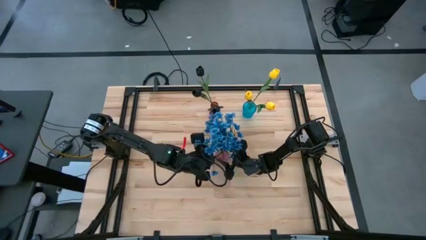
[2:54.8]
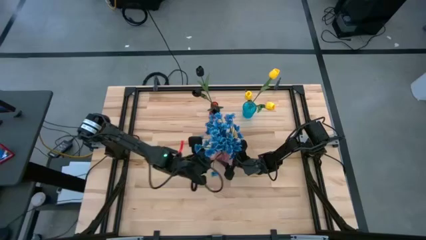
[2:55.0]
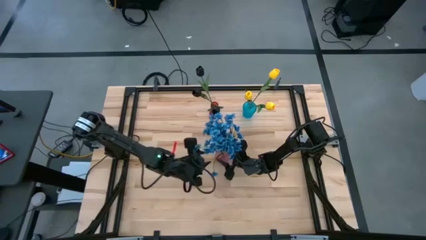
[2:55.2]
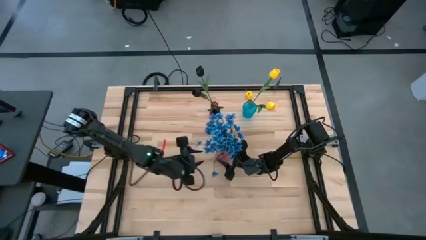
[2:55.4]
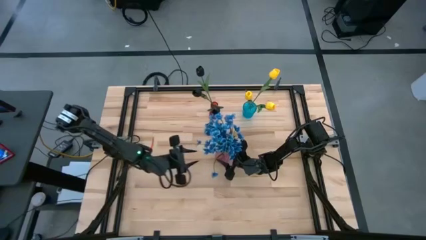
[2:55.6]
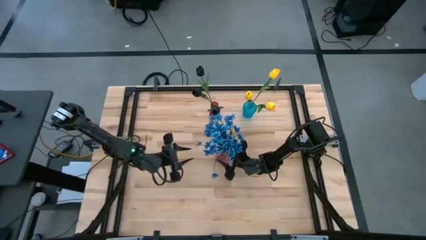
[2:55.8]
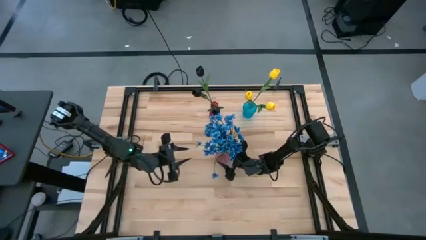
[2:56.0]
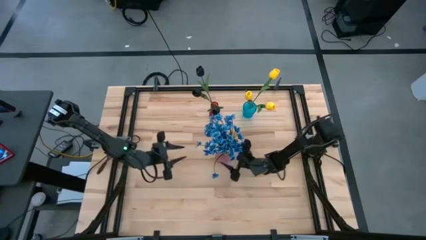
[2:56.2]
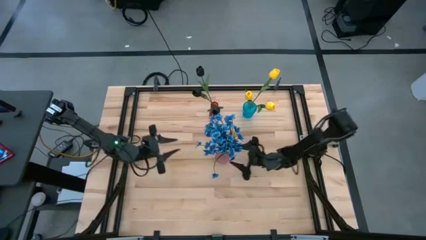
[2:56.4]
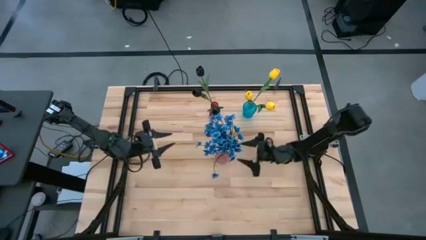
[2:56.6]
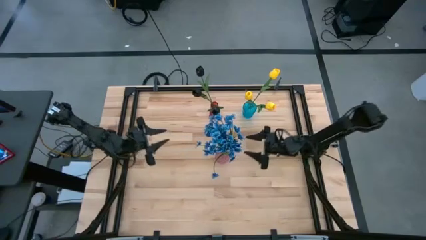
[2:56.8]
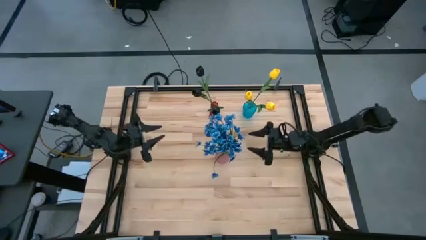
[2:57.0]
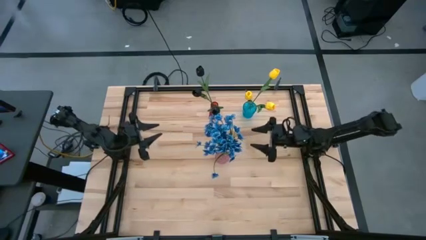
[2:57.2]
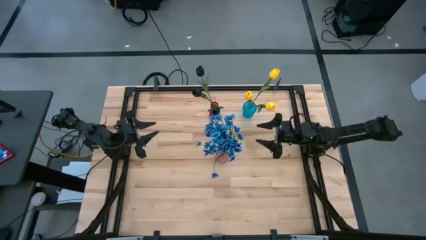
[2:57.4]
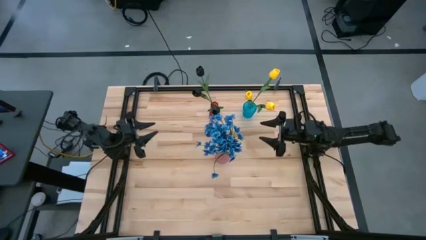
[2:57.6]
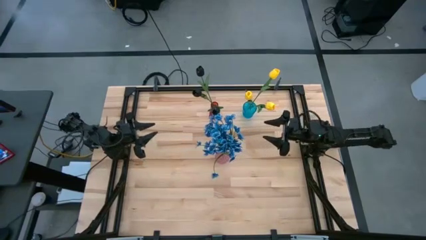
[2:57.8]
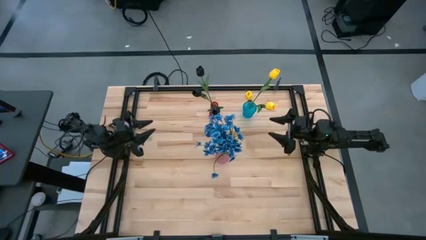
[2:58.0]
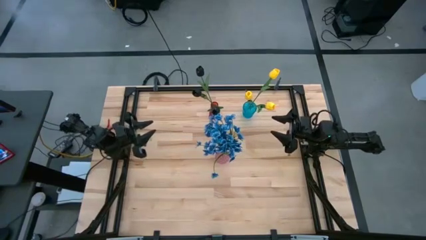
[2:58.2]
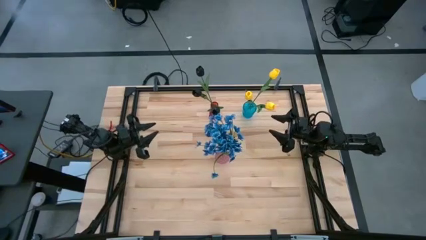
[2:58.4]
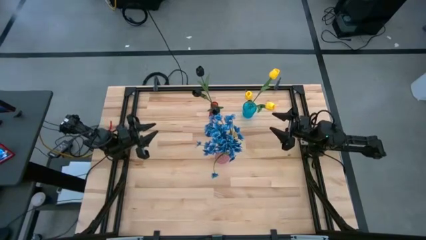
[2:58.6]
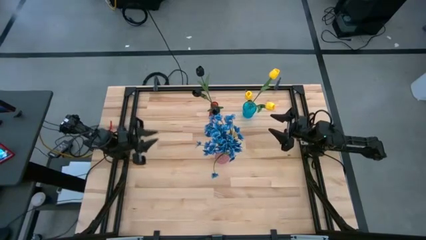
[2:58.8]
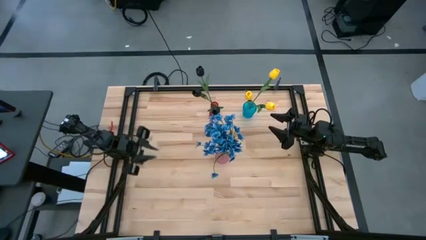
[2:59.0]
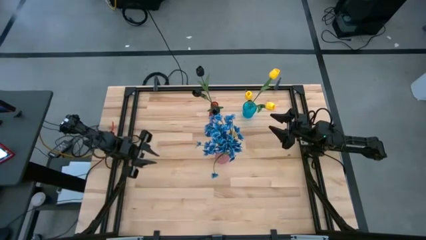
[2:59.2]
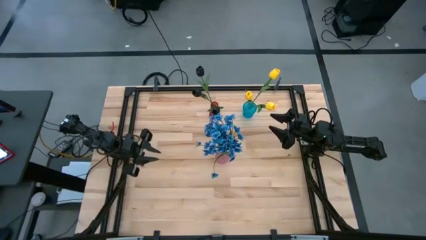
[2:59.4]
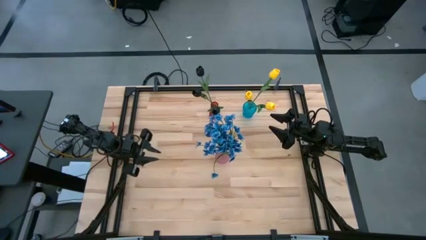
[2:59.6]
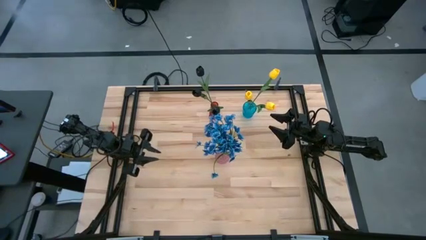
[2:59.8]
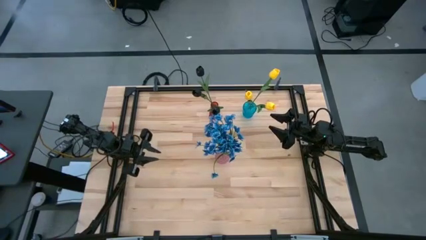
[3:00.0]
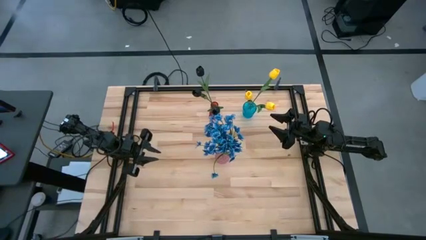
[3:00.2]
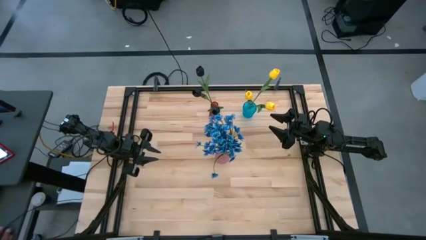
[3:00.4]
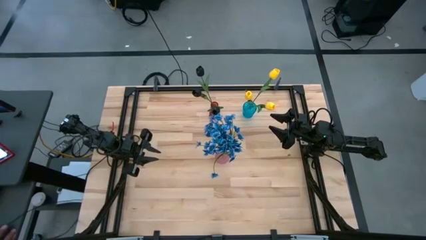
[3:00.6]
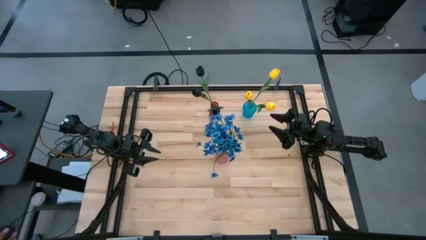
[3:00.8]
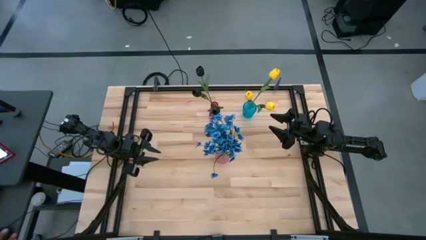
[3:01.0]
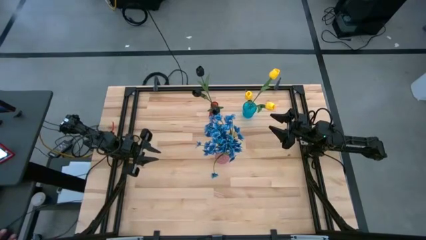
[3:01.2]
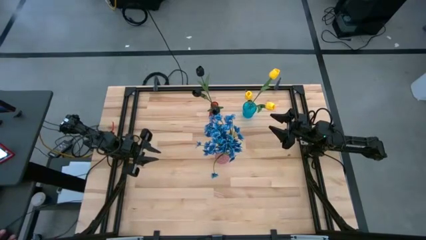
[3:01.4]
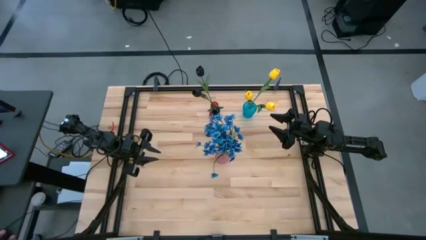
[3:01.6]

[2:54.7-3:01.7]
Task: Sort flowers into vase by color
Return to Home Position

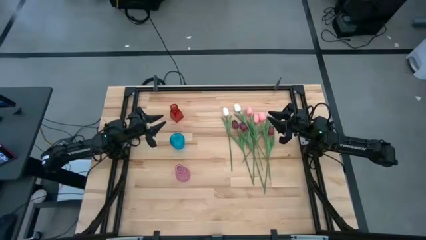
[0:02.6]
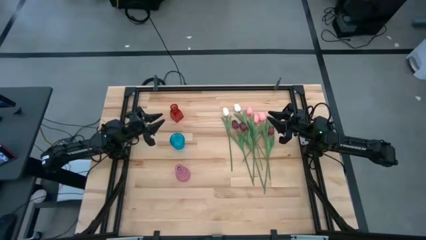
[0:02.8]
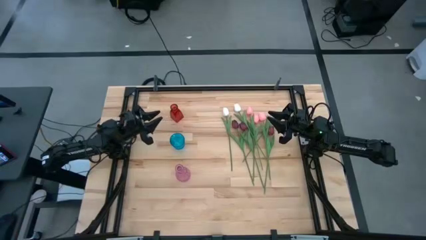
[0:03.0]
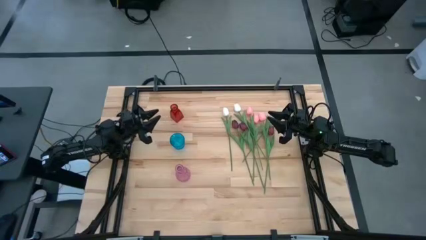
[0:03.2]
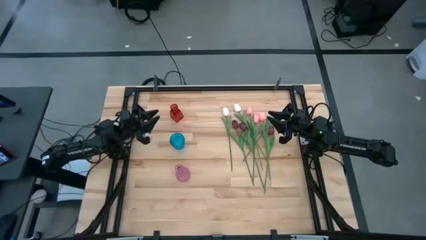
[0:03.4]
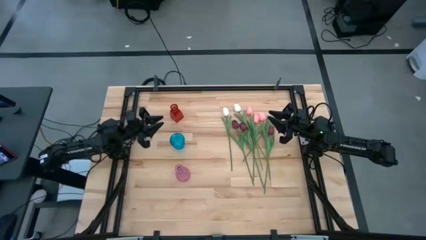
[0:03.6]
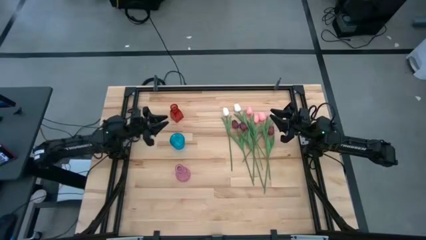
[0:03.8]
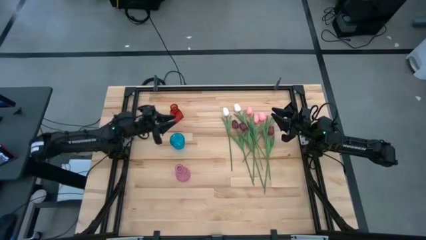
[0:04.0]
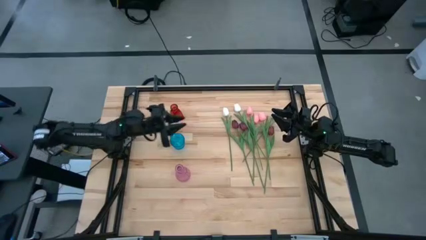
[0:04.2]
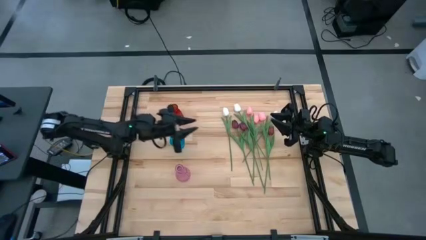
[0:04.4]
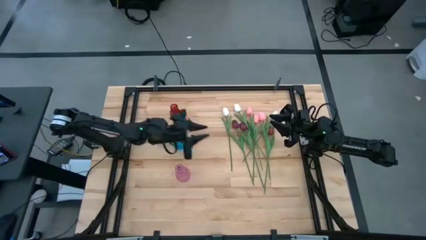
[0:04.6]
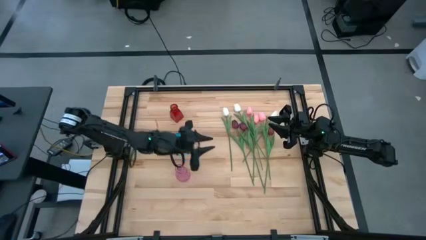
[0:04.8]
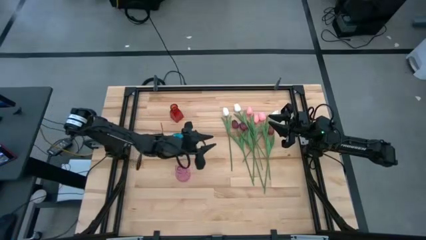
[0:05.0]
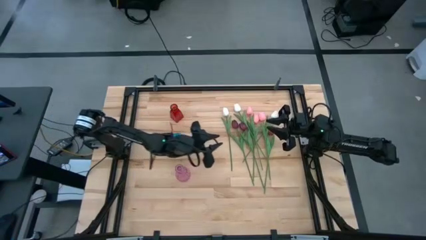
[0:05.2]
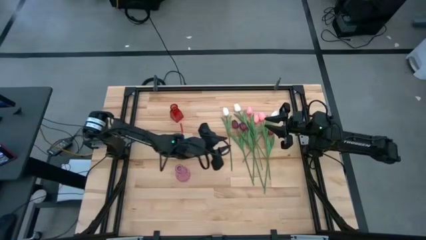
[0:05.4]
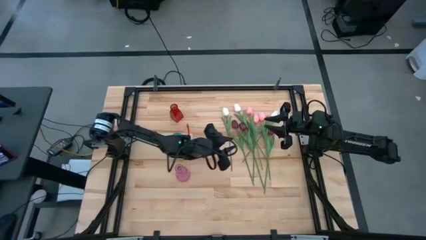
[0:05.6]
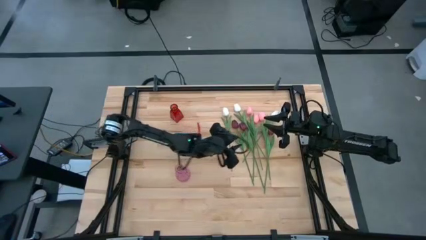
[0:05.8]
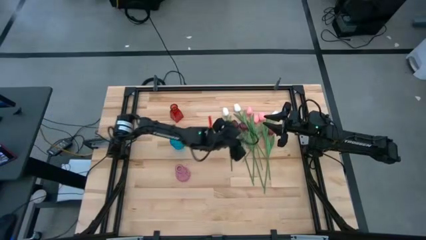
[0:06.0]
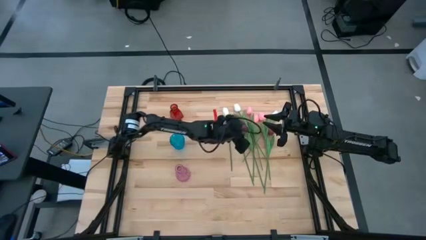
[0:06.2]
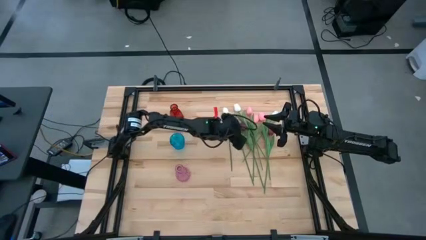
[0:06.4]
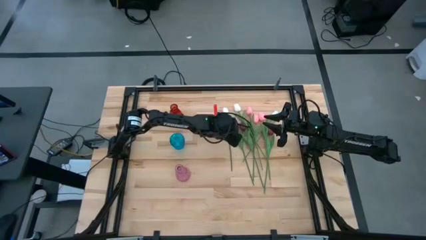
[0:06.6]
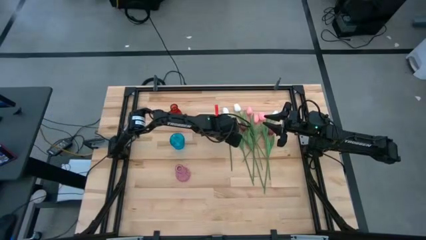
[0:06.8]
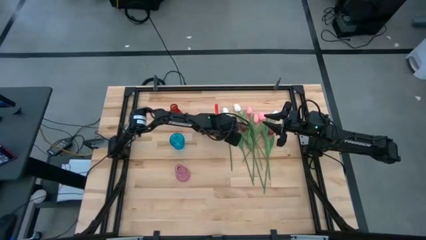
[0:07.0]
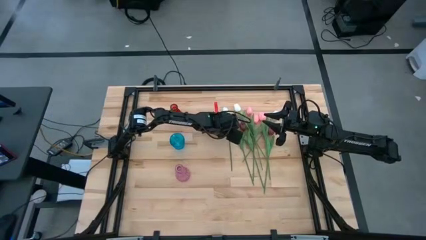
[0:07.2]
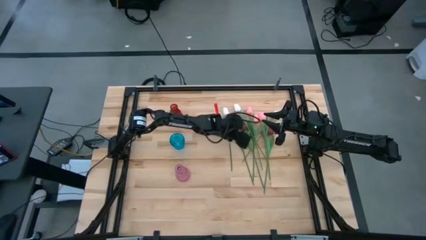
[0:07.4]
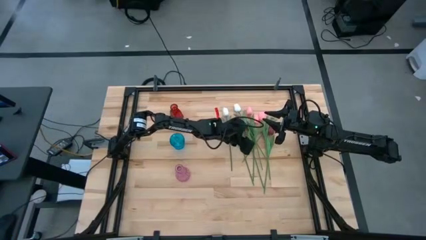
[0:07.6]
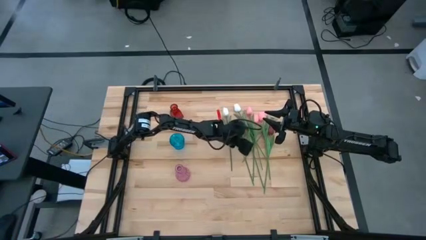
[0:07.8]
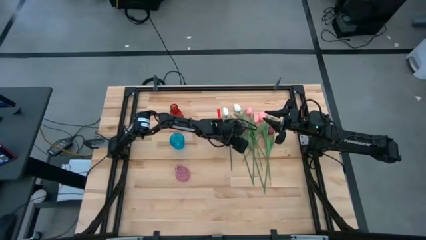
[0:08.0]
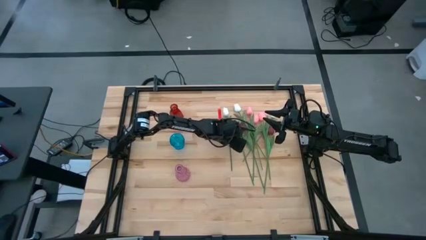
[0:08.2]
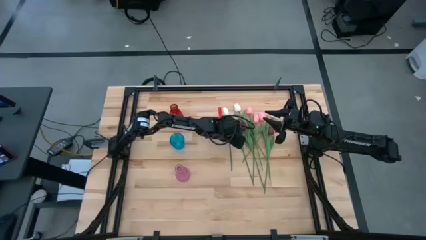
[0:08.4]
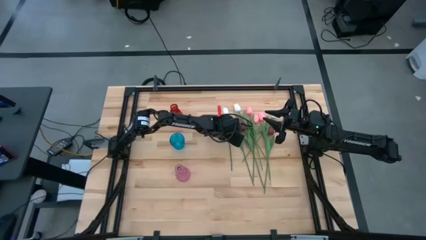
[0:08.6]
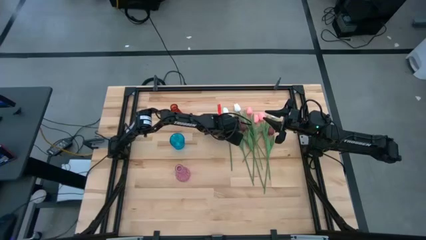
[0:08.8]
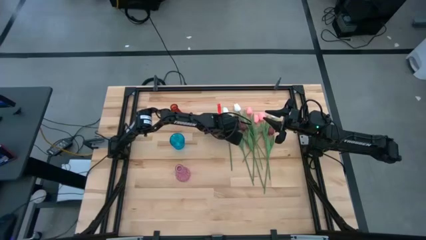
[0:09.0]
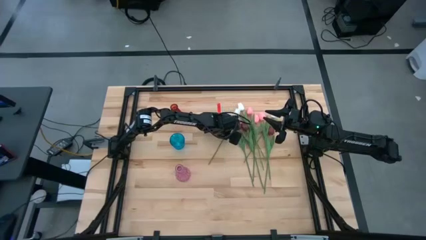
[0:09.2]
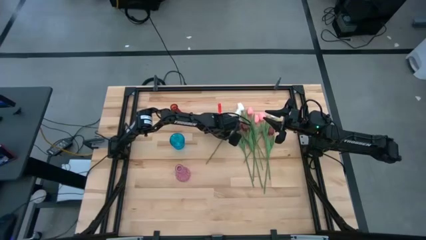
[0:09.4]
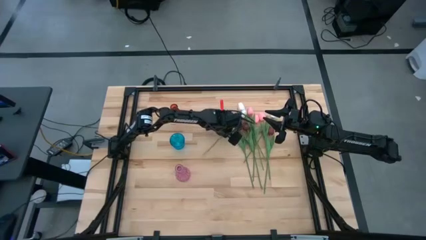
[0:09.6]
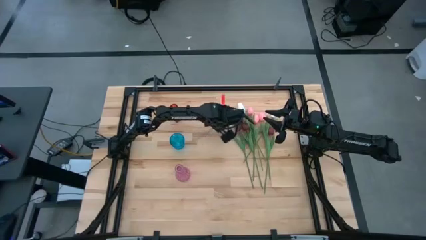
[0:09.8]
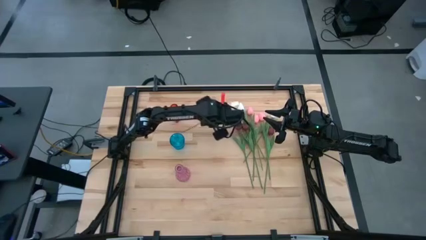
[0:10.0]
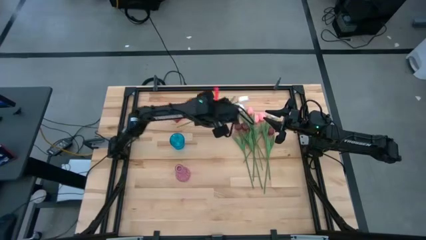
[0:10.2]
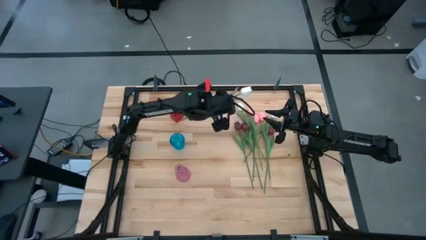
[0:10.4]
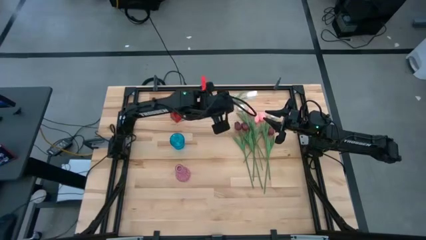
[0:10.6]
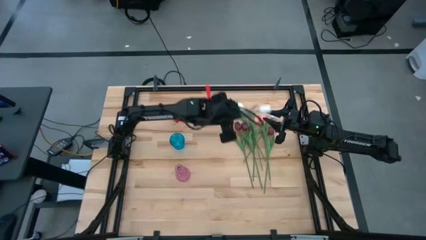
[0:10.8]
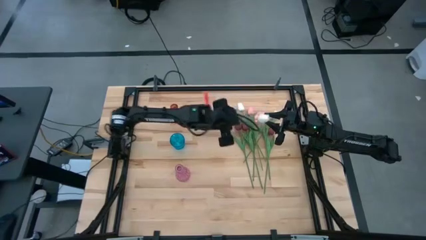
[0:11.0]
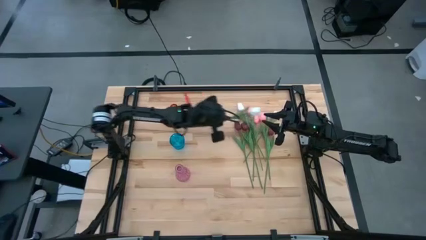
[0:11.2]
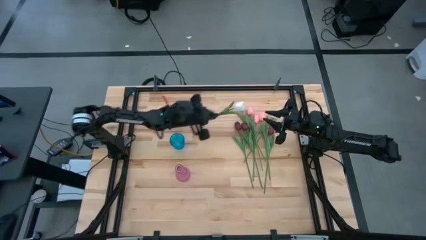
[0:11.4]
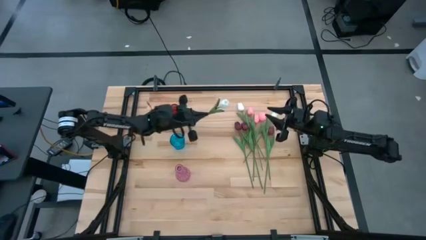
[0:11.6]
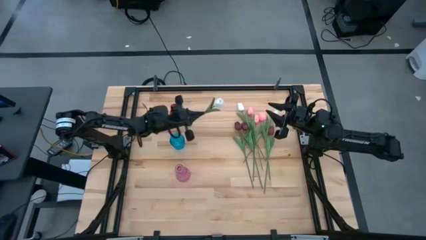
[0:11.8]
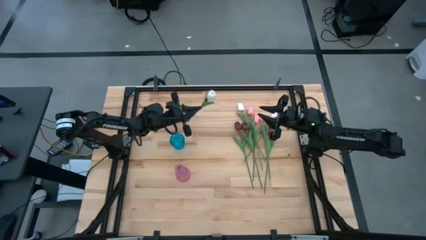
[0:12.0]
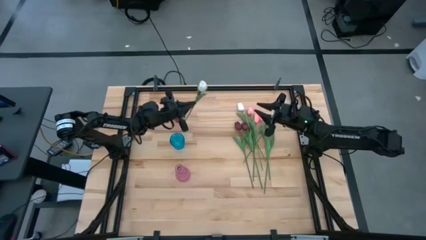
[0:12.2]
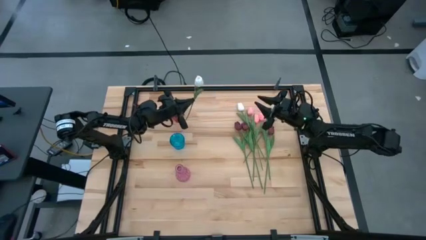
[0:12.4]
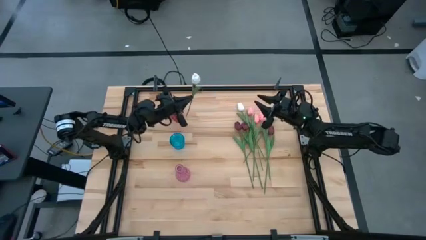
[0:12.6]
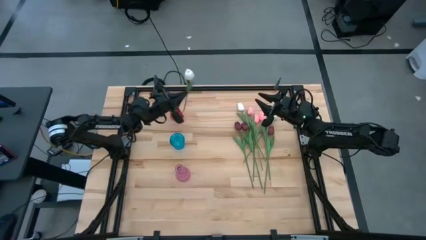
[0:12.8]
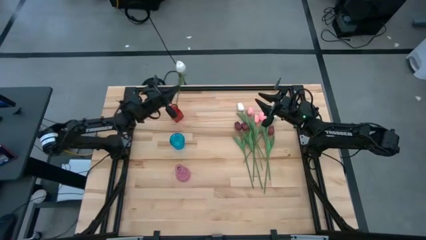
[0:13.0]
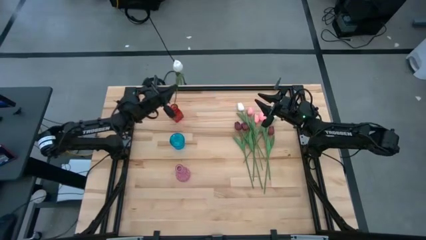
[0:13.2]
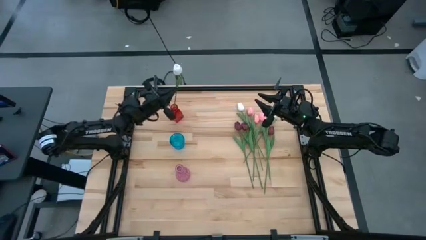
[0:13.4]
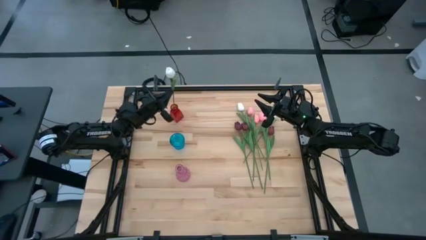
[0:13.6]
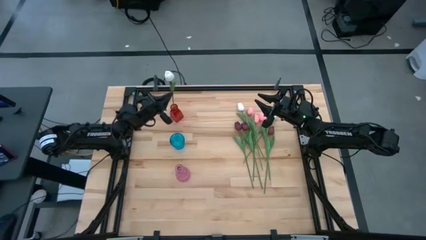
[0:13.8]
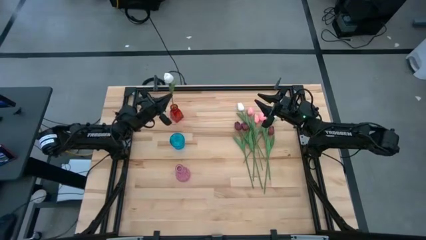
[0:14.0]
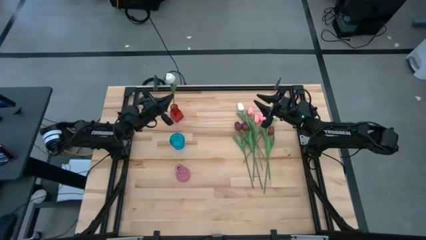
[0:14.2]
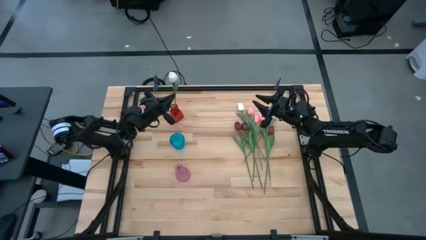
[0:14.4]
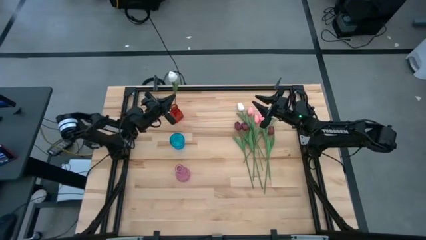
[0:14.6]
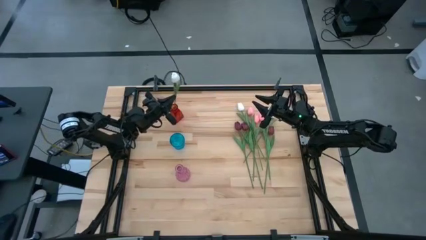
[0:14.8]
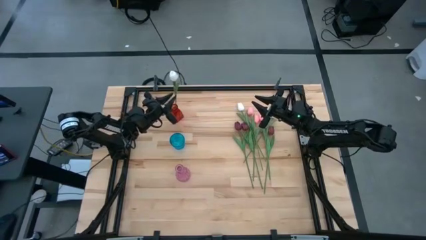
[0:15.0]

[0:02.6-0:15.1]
Task: Sort flowers into vase by color
Put the left white flower into the red vase
